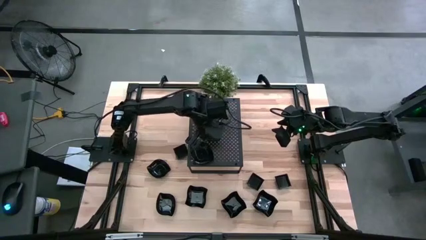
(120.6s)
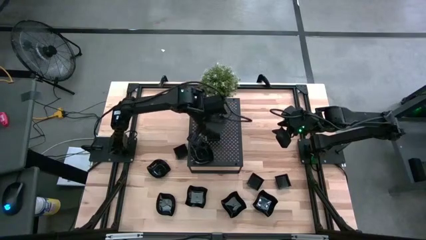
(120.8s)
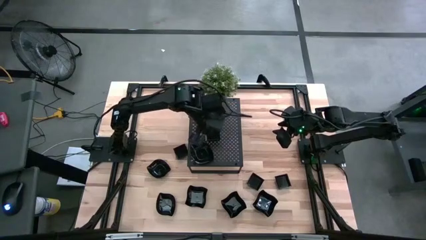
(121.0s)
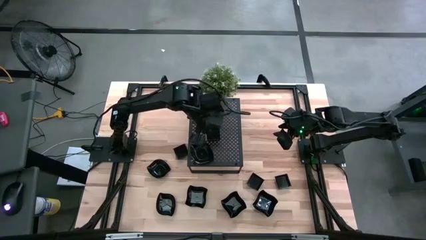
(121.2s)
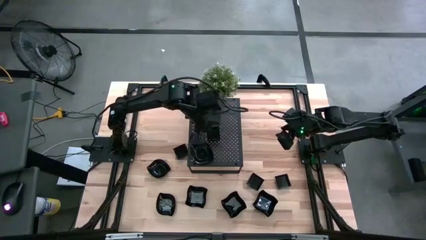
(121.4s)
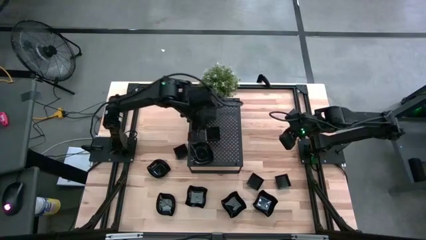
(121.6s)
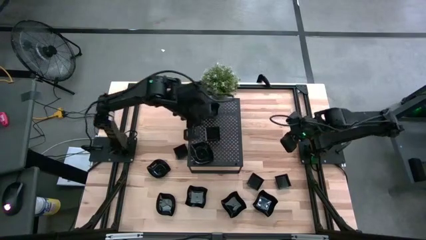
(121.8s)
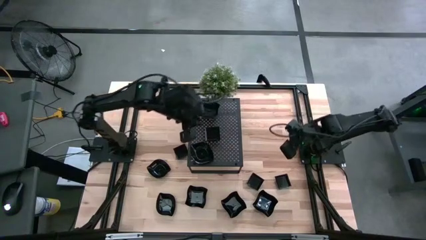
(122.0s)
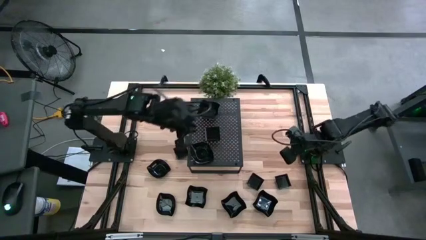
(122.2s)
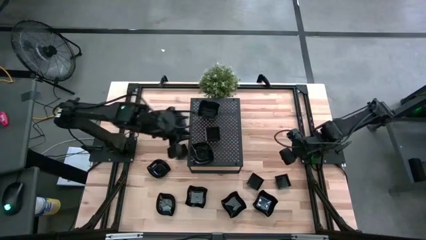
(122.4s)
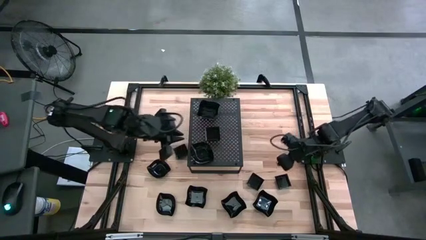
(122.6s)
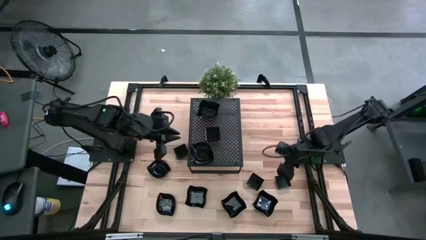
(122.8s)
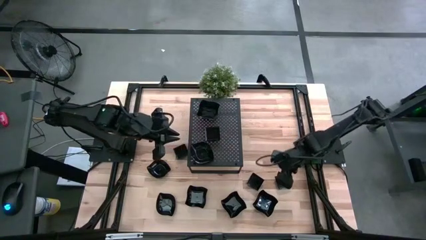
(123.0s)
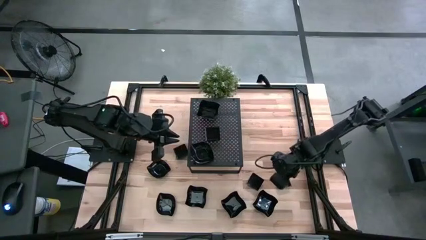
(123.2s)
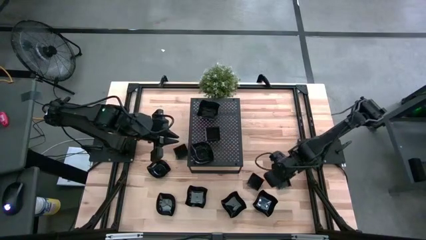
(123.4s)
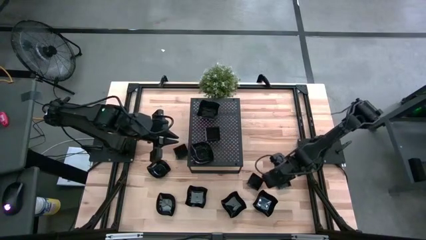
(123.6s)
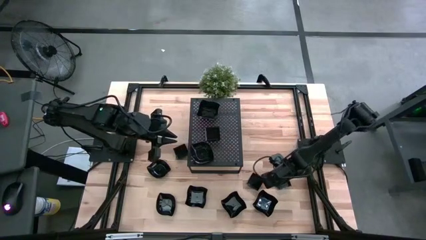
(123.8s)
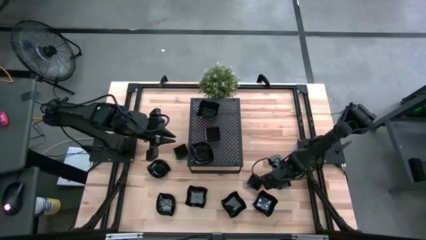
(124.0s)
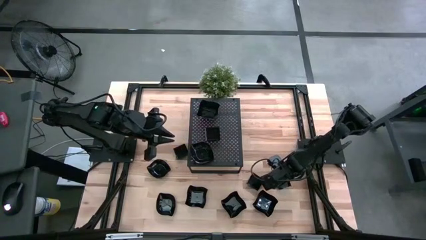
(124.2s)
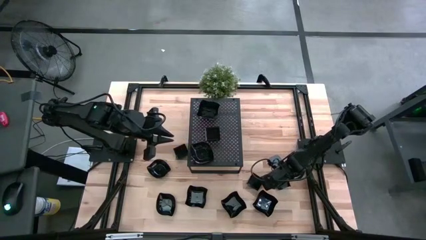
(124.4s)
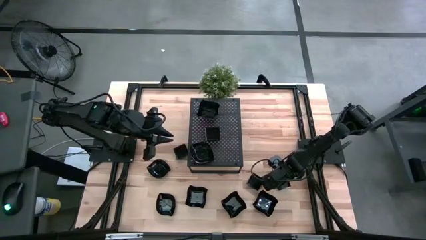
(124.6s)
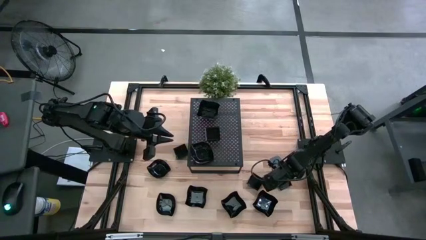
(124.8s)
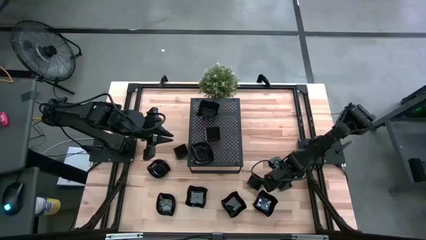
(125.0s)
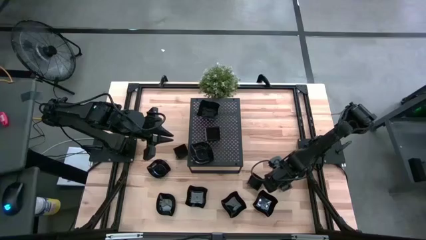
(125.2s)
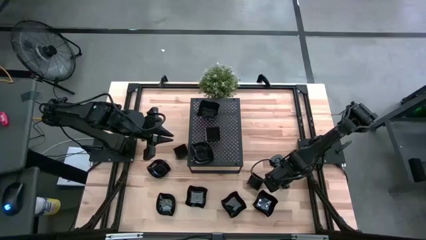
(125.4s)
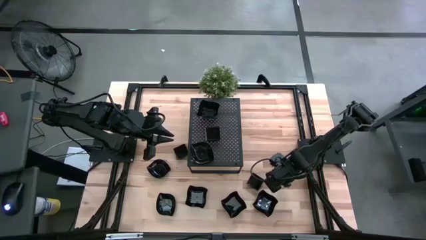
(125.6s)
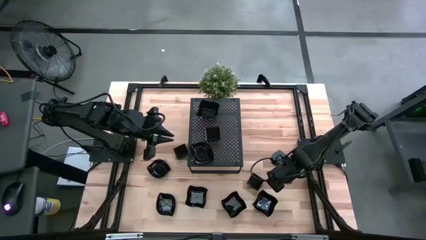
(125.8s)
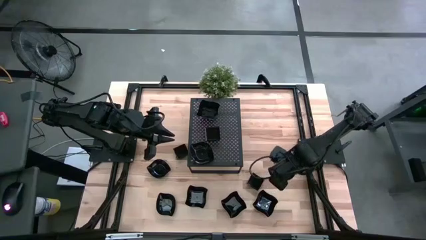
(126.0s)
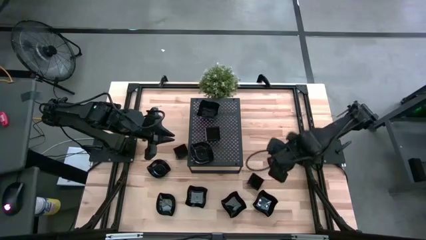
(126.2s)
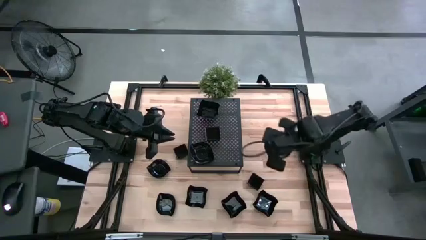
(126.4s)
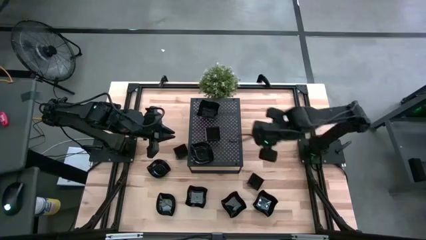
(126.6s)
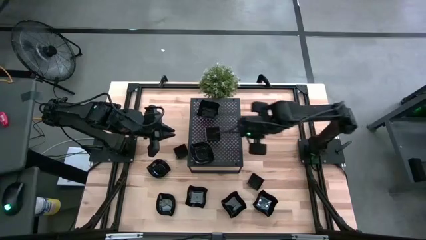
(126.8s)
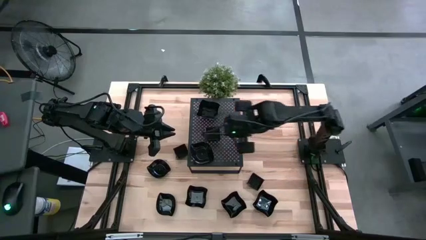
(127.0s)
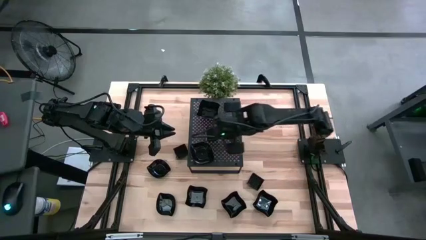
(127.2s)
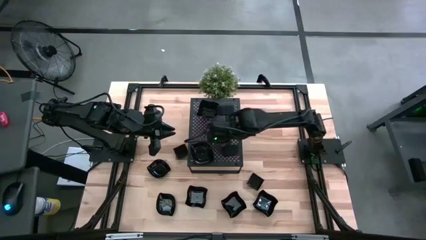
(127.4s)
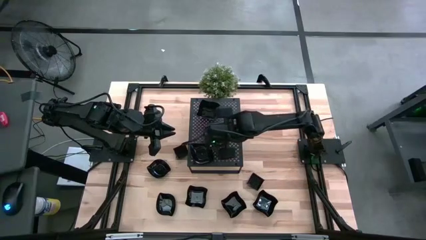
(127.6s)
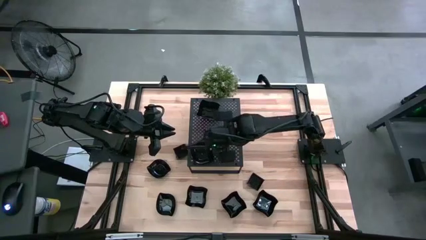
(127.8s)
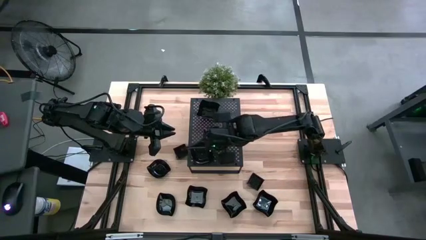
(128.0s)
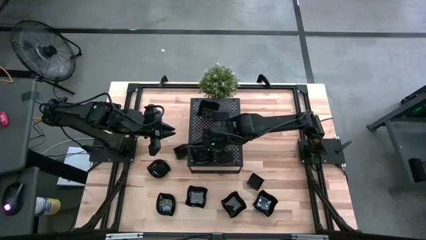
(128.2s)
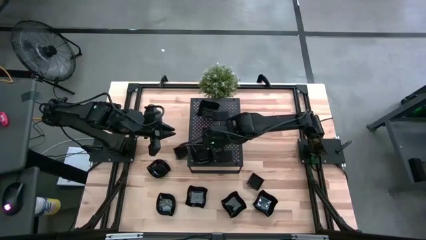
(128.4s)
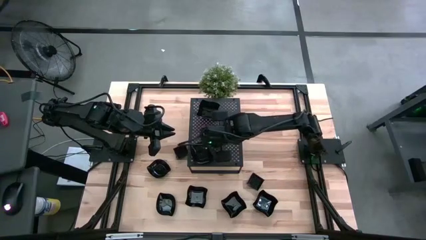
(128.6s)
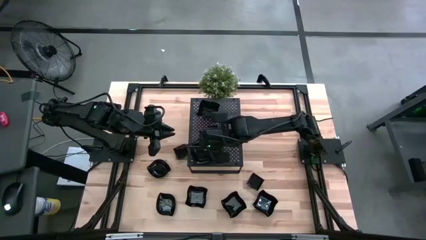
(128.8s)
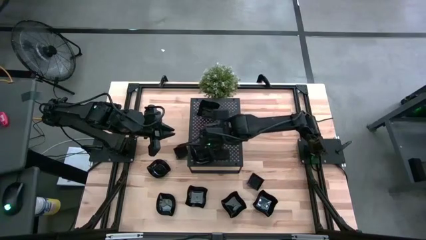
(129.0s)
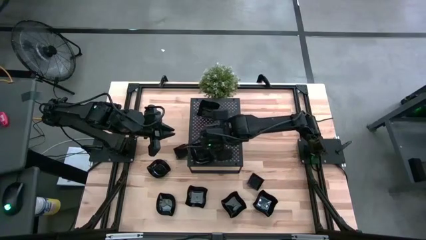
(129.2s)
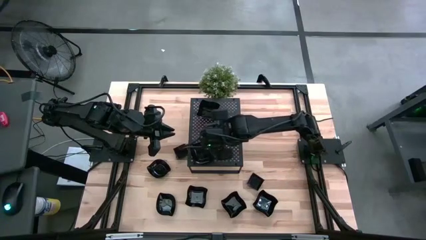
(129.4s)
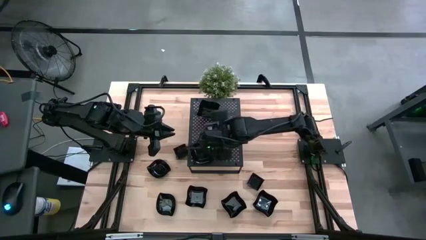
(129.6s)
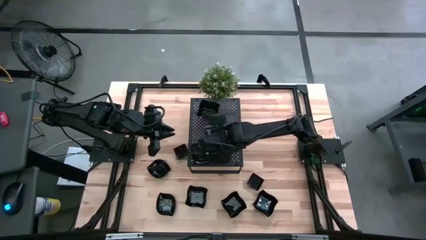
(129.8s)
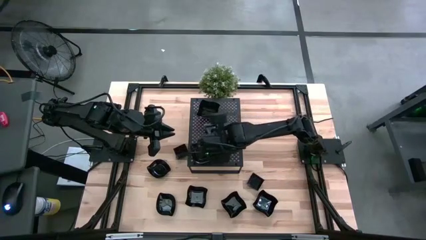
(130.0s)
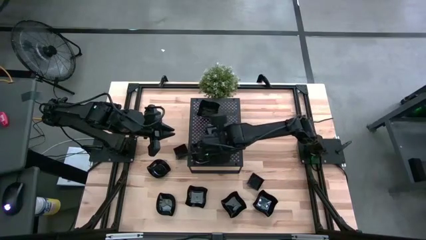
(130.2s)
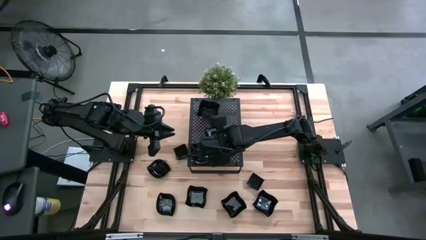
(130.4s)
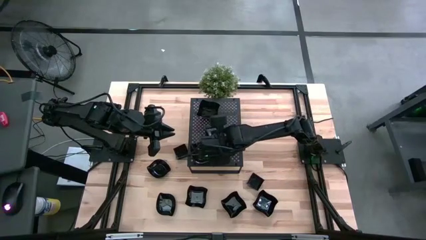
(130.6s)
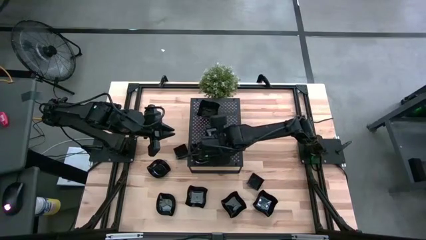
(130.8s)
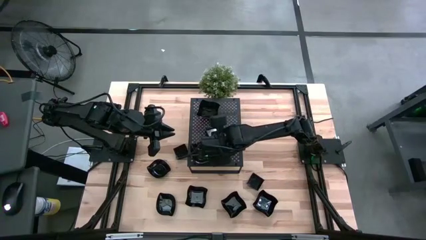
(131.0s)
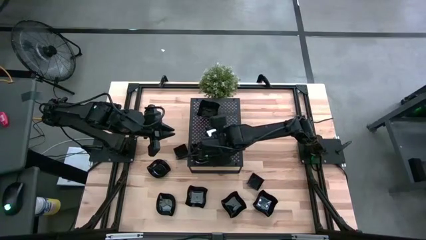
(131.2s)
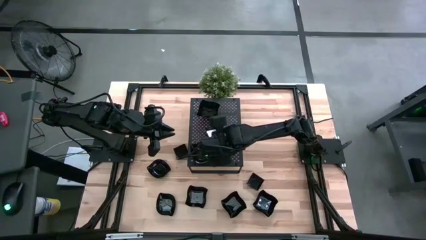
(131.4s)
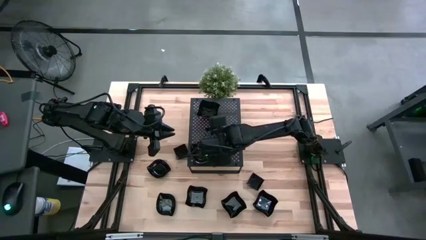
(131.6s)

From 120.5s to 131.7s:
Task: Pick & Place Mini shaped plates
Stack the square plate on top of the square plates on the shelf
